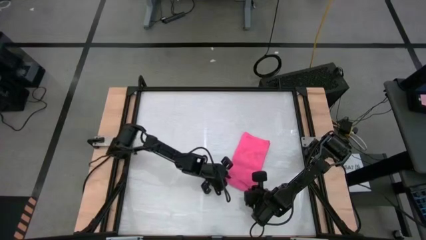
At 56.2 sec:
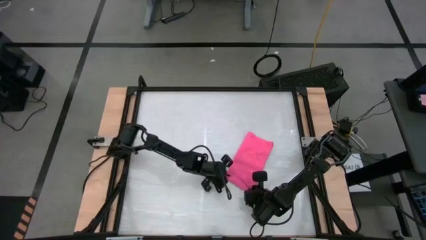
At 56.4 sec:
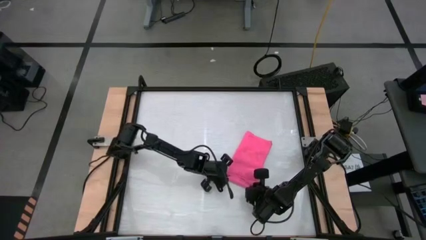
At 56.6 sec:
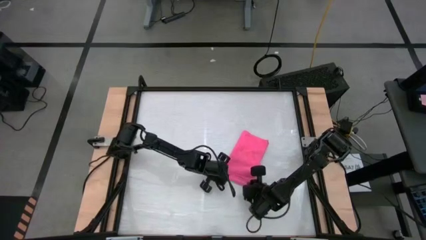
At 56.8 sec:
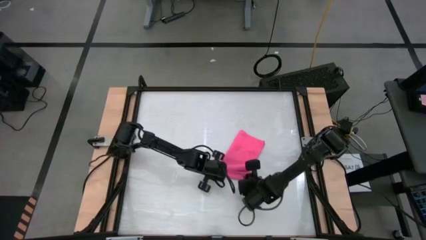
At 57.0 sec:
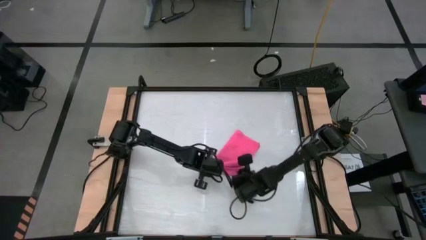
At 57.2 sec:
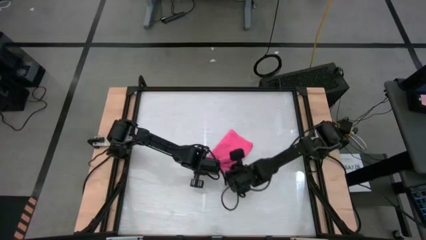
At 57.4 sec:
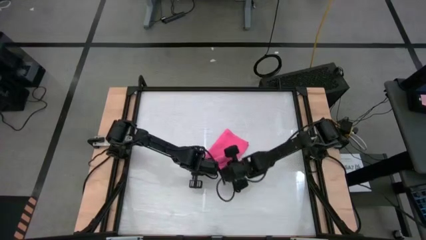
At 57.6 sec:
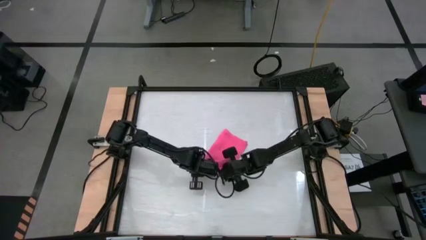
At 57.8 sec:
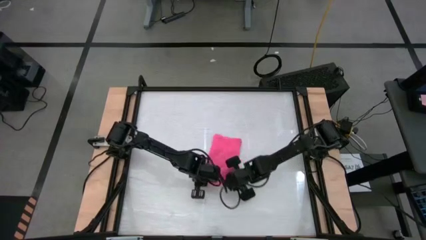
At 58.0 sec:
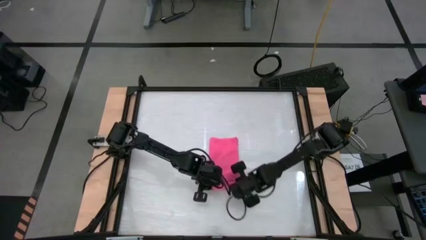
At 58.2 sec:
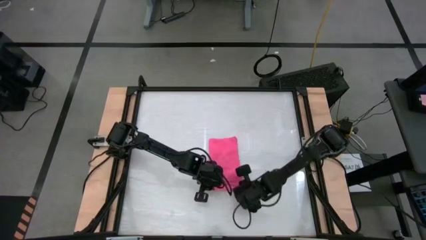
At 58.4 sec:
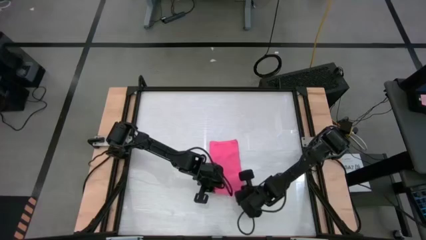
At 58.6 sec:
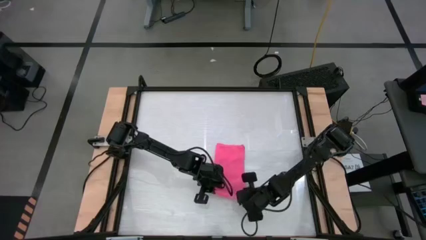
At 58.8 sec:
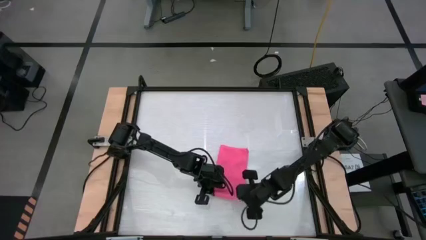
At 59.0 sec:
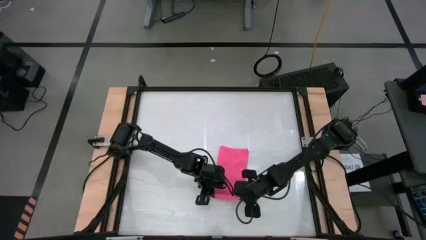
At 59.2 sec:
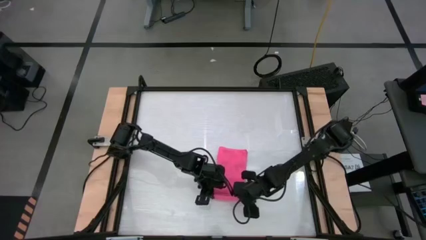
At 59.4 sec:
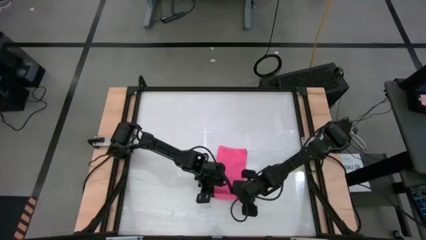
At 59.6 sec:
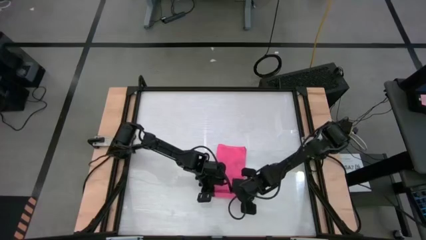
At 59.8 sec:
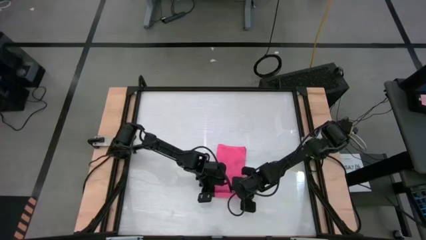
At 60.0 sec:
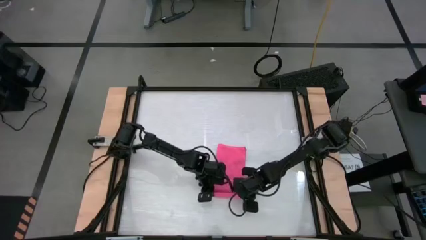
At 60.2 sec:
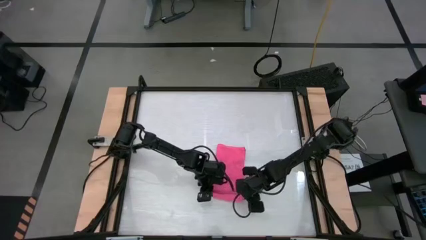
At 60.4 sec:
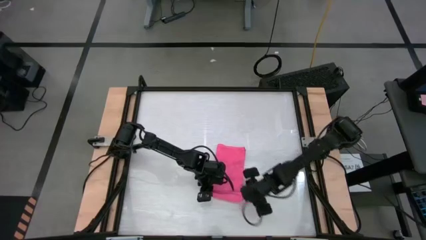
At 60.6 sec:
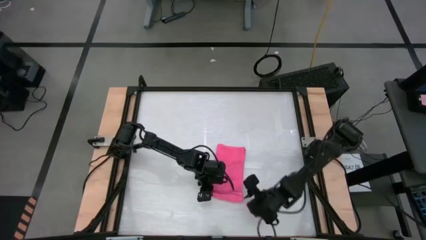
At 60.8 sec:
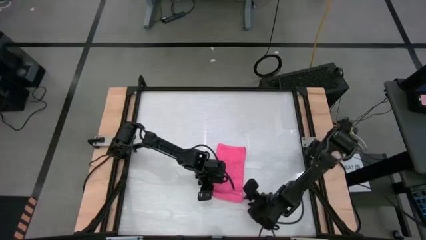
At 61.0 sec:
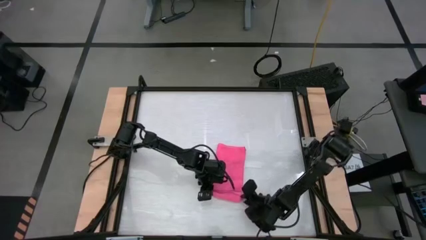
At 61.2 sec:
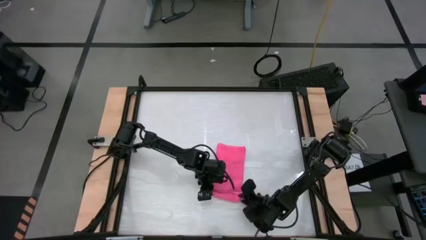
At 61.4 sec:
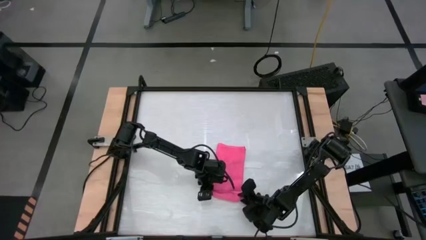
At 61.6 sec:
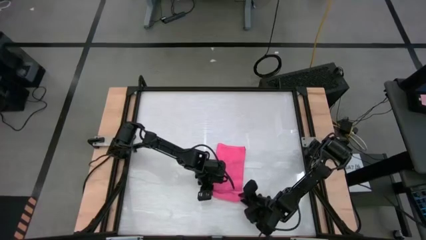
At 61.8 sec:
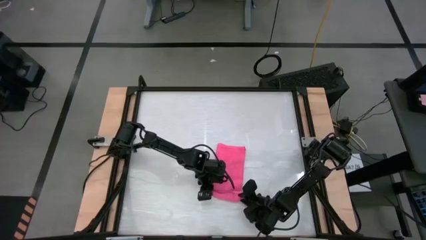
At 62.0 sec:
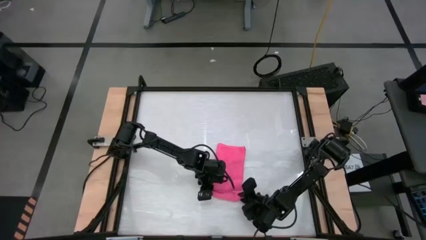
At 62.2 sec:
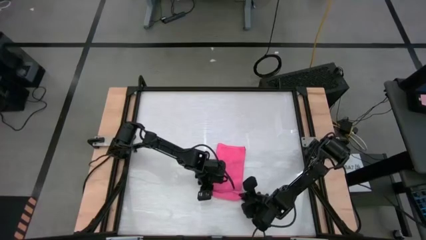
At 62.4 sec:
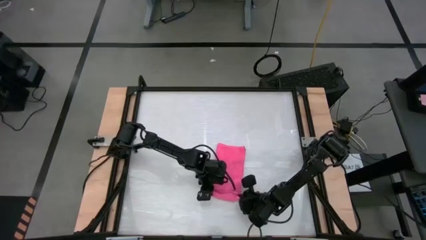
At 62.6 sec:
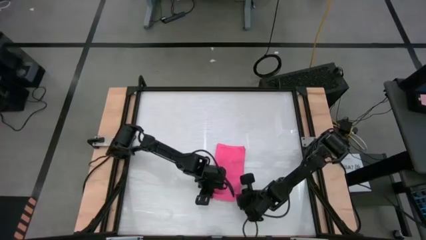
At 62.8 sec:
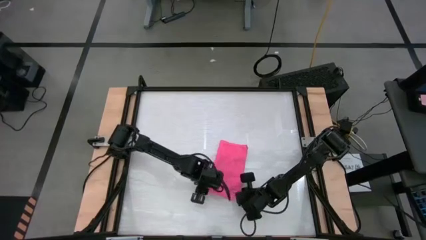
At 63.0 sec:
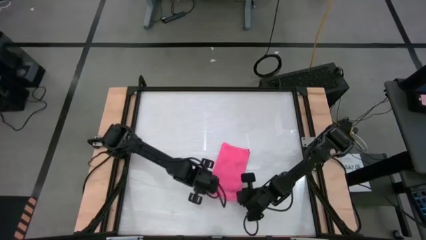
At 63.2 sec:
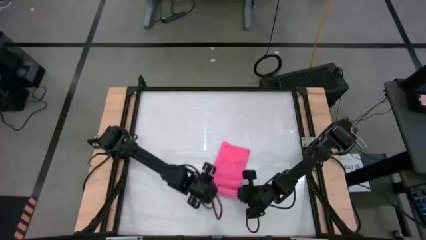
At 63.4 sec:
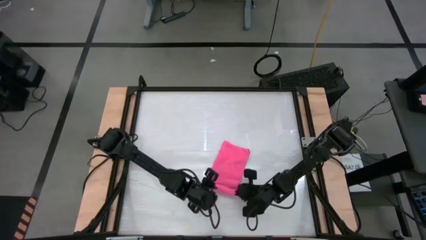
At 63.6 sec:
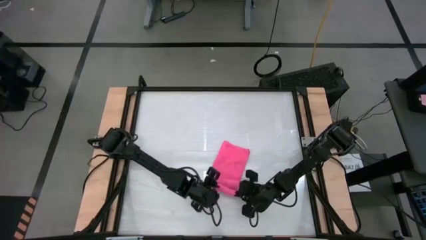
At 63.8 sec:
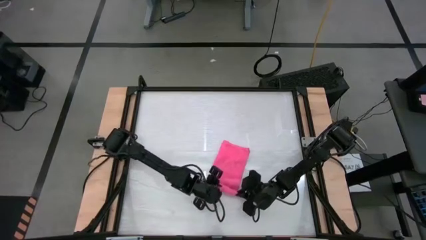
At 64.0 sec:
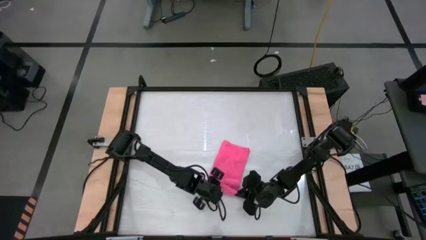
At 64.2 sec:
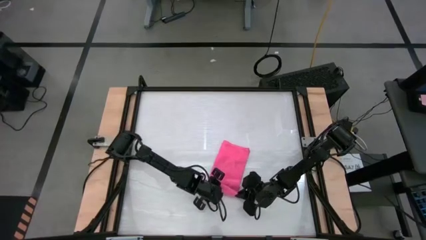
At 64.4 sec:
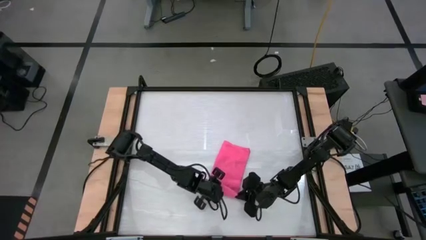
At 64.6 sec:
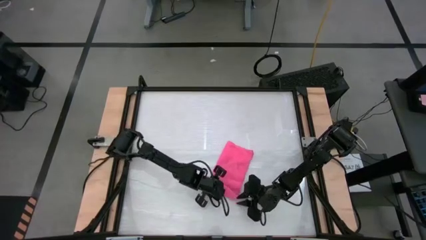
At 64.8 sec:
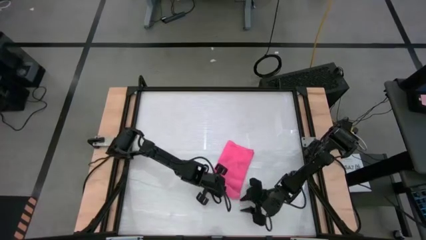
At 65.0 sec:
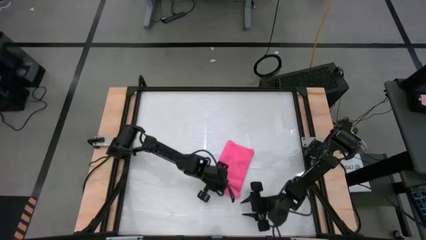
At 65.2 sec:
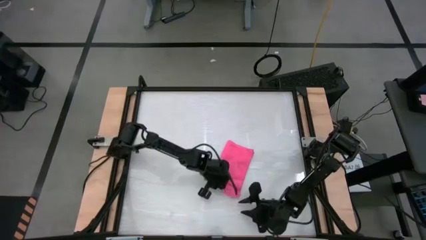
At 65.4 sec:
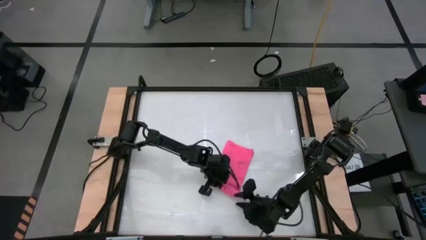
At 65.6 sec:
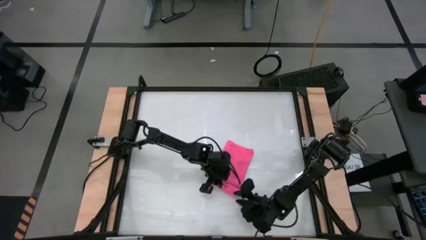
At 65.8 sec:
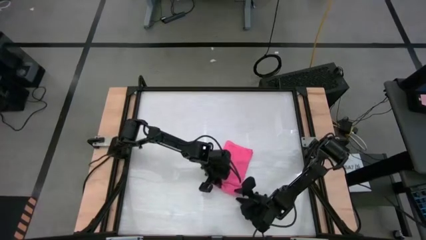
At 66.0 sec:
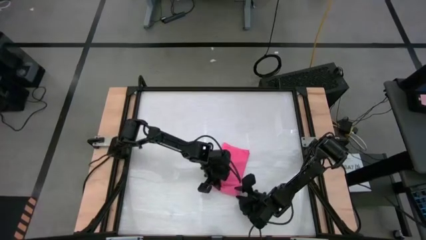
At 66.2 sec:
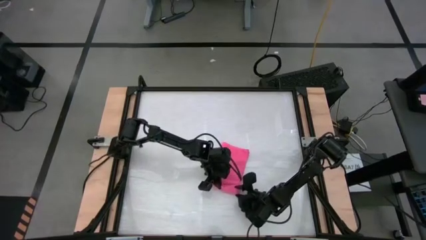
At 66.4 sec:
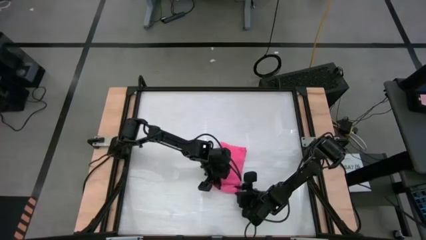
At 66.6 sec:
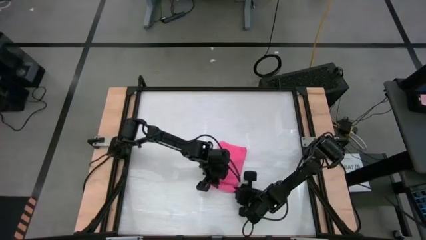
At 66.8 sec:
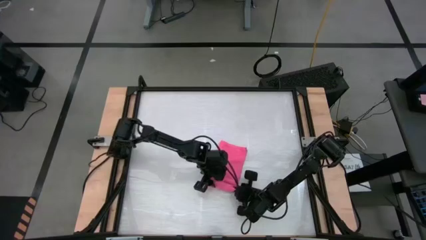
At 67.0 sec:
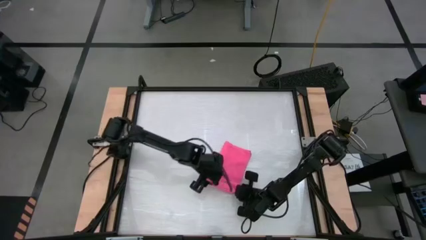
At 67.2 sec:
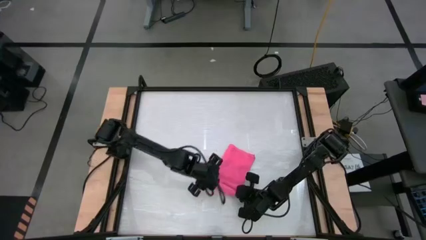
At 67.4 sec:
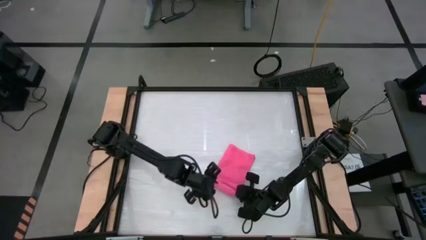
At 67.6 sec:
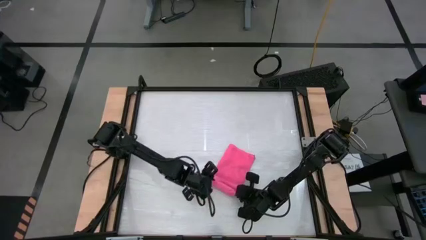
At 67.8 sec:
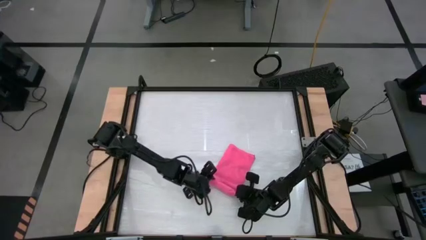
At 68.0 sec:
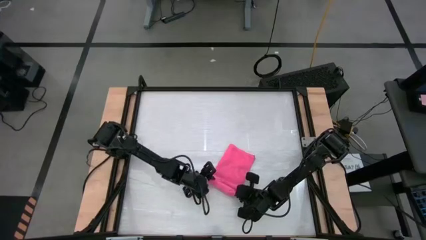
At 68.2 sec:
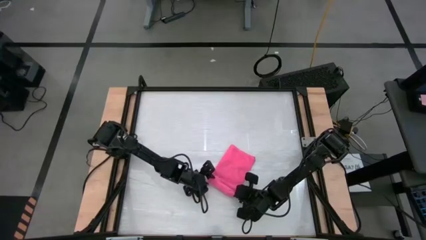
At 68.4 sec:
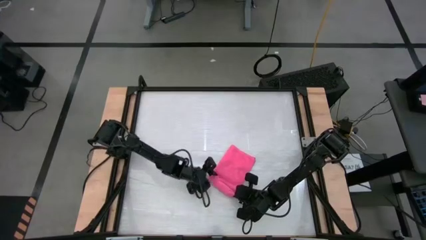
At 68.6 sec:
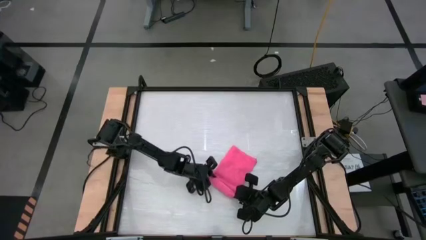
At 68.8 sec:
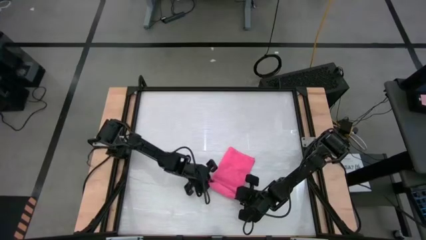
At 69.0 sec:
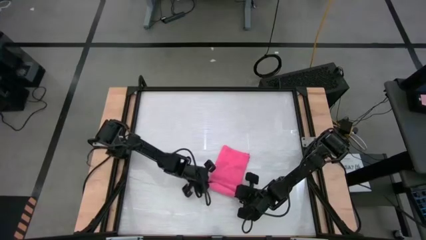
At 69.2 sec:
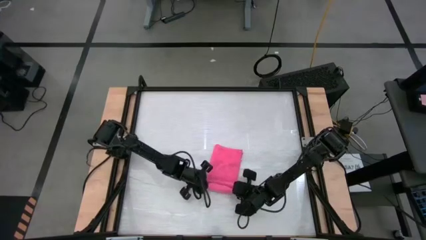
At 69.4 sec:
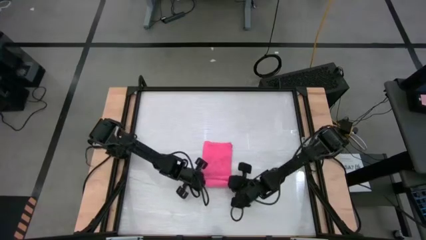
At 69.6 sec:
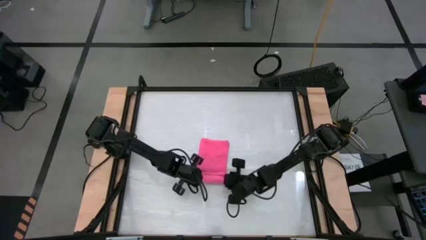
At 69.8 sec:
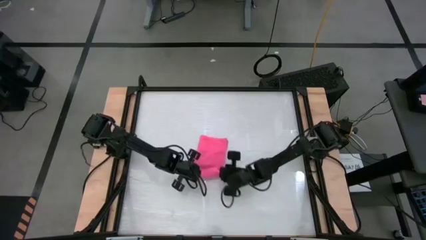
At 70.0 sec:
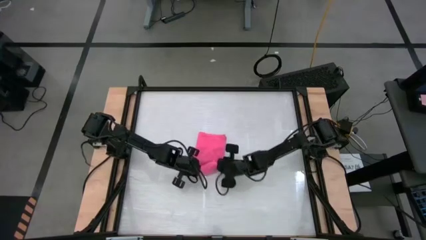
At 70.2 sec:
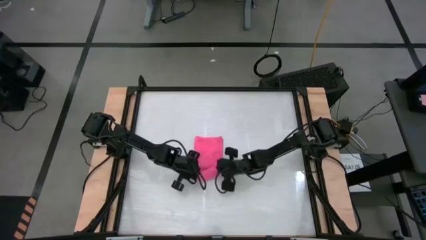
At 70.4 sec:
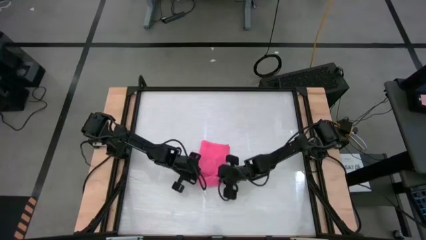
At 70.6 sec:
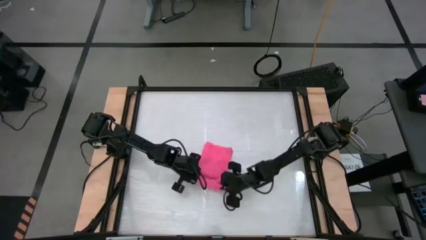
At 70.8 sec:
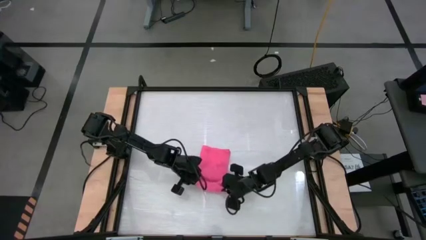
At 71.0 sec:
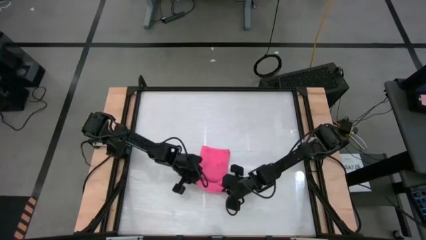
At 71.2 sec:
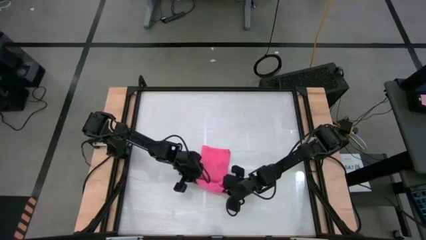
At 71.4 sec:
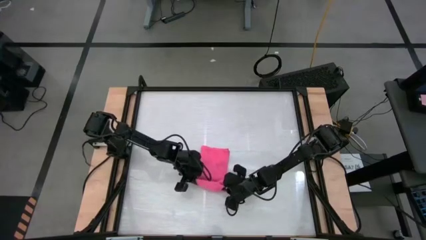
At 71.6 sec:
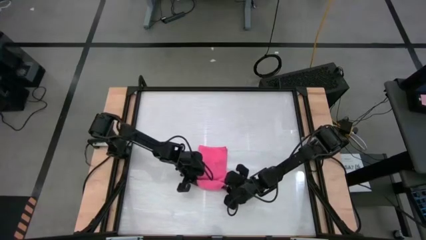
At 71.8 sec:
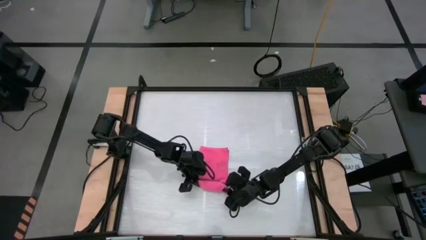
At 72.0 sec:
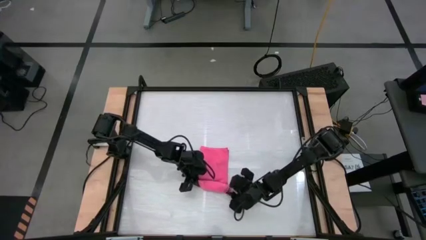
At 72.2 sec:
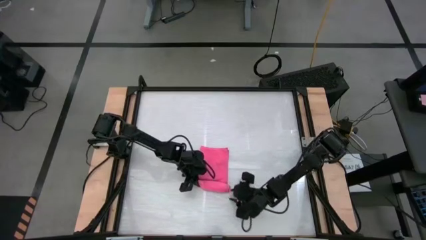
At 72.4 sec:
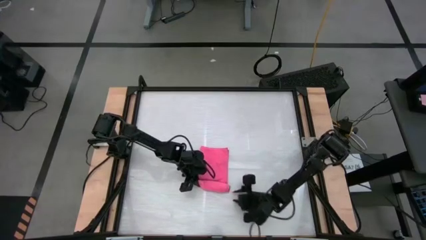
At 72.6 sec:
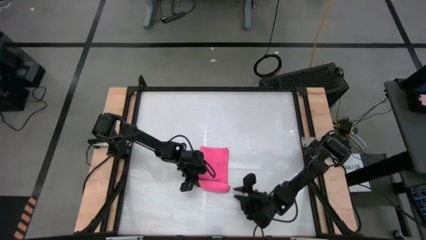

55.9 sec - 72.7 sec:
Task: Roll towel
Roll the pink towel
